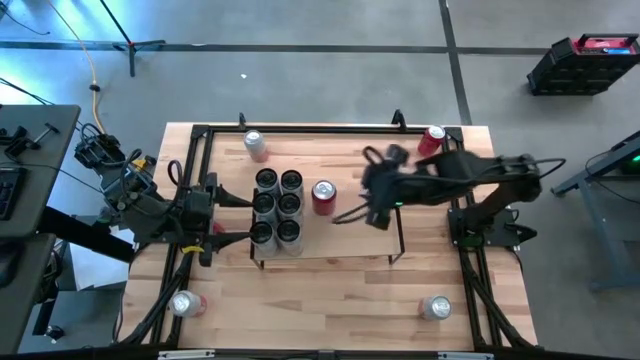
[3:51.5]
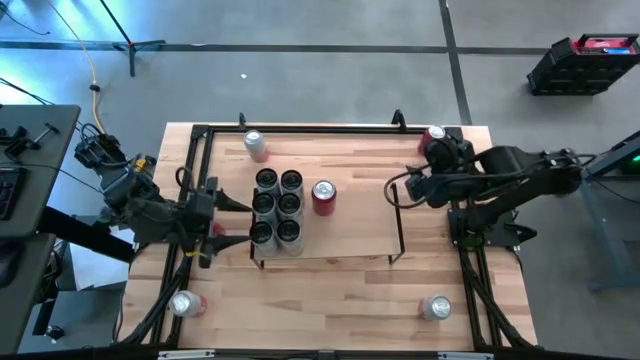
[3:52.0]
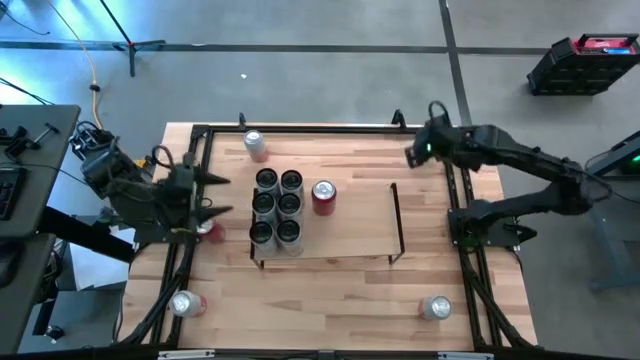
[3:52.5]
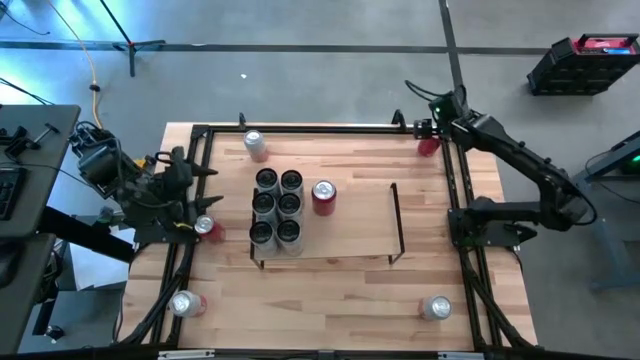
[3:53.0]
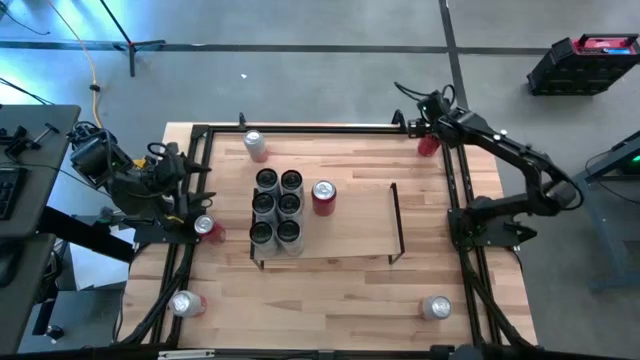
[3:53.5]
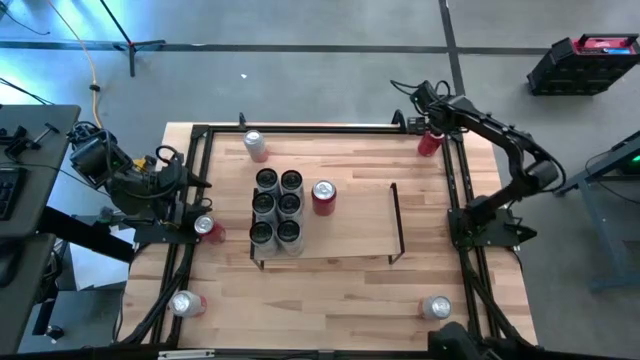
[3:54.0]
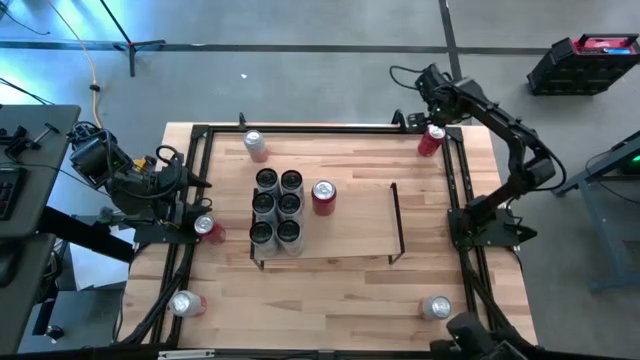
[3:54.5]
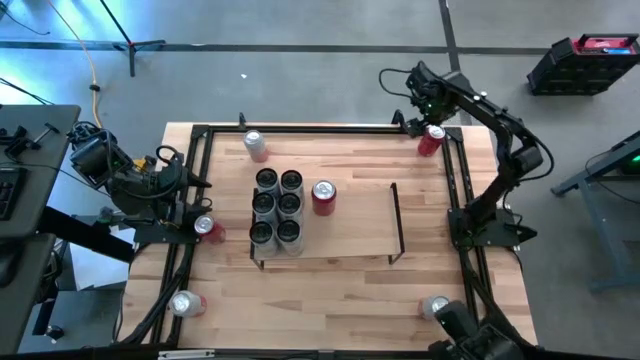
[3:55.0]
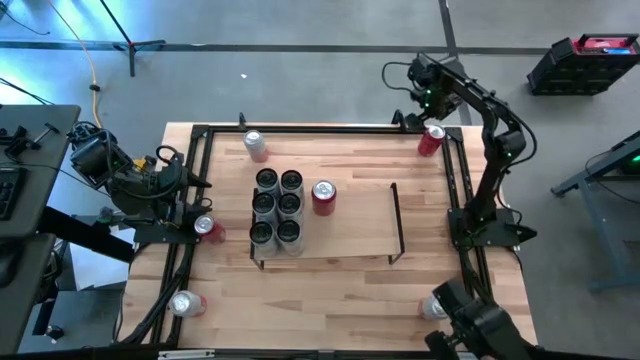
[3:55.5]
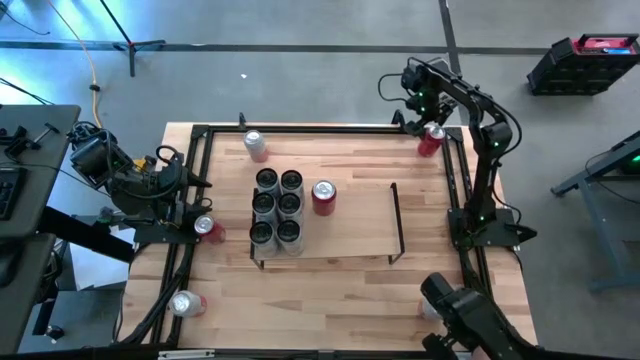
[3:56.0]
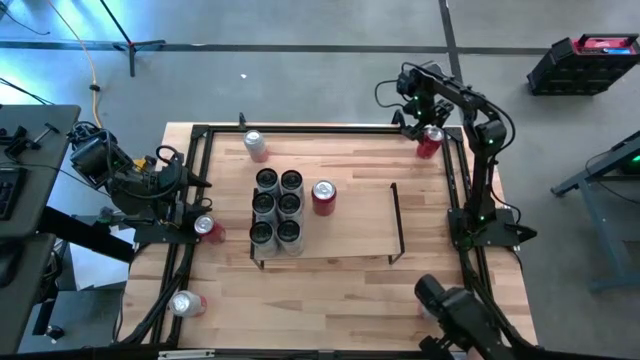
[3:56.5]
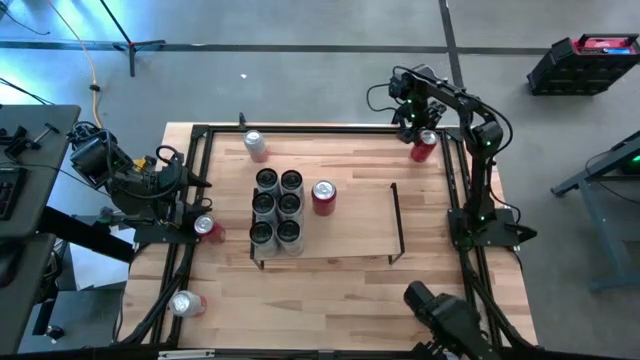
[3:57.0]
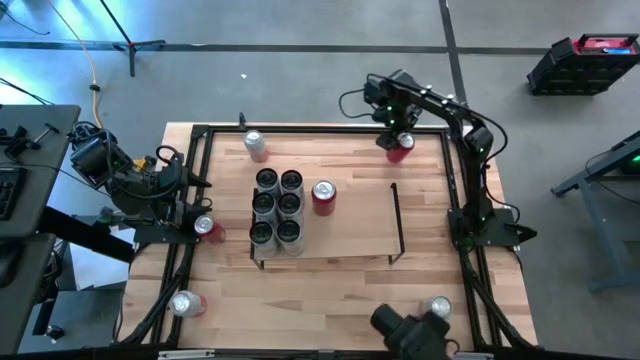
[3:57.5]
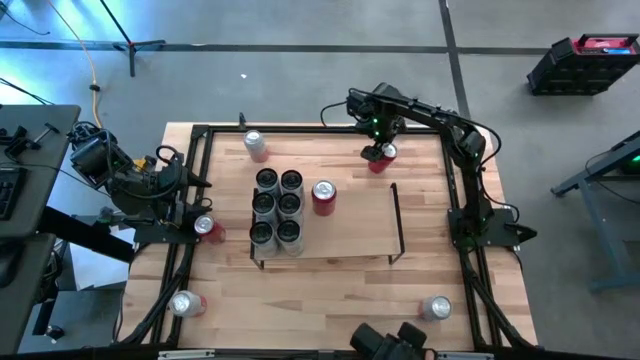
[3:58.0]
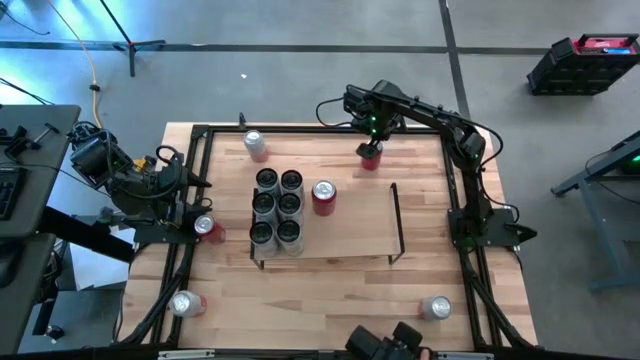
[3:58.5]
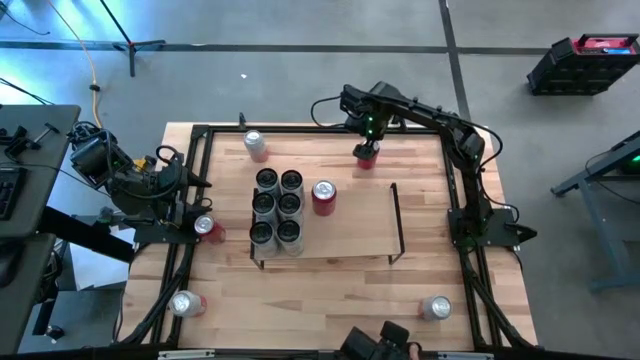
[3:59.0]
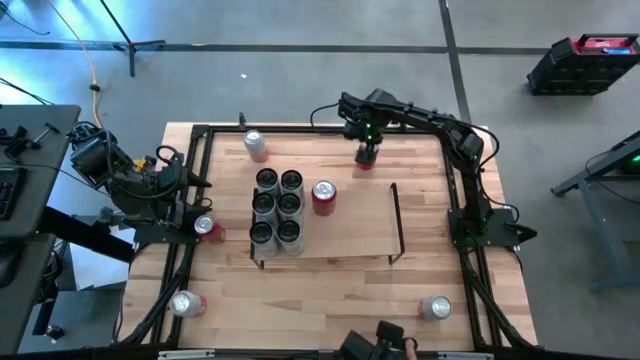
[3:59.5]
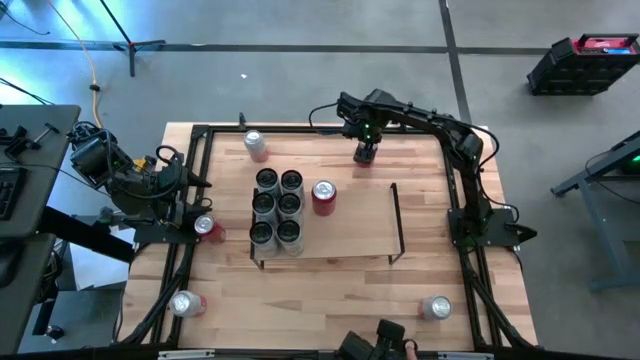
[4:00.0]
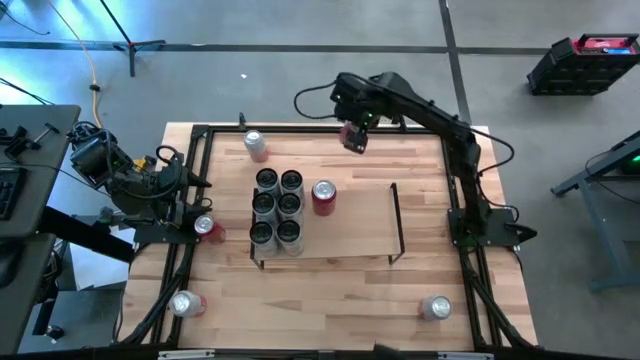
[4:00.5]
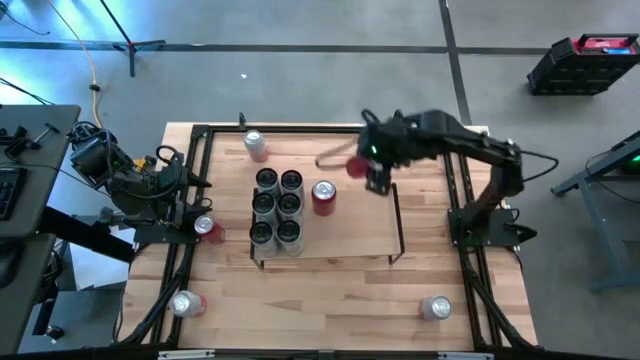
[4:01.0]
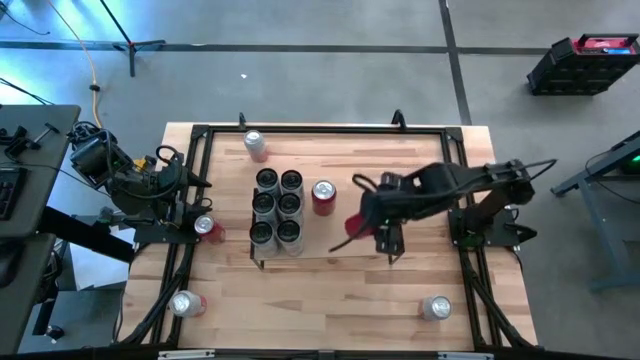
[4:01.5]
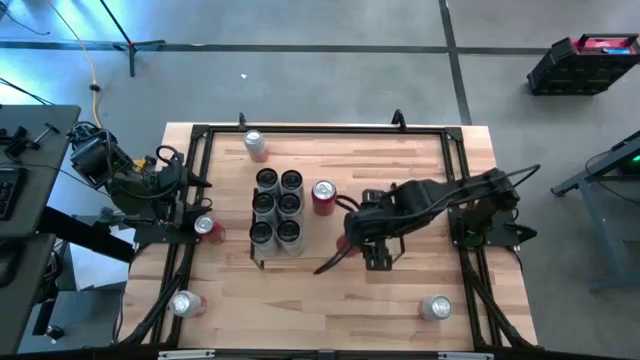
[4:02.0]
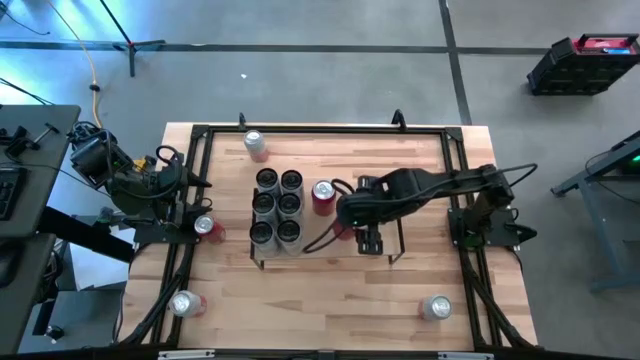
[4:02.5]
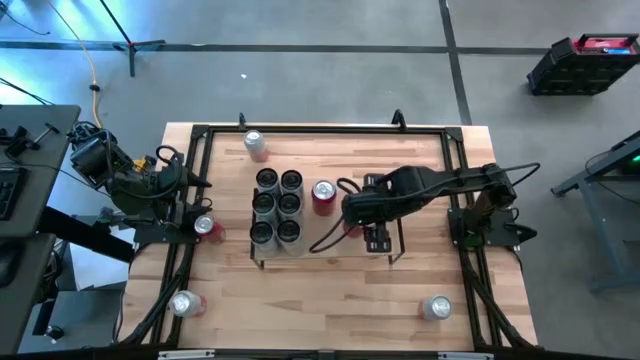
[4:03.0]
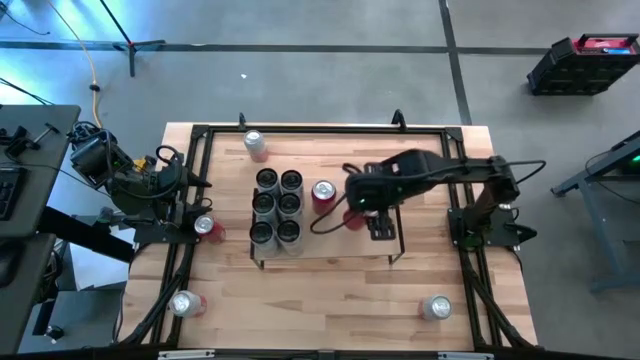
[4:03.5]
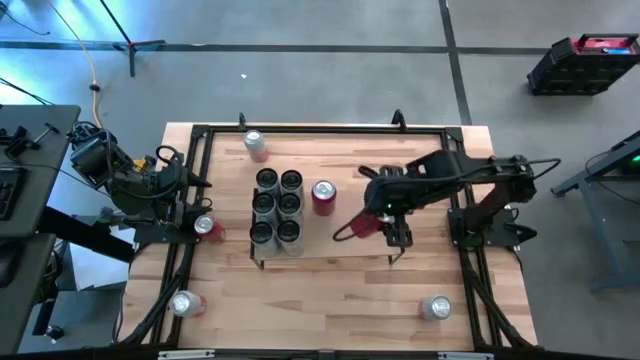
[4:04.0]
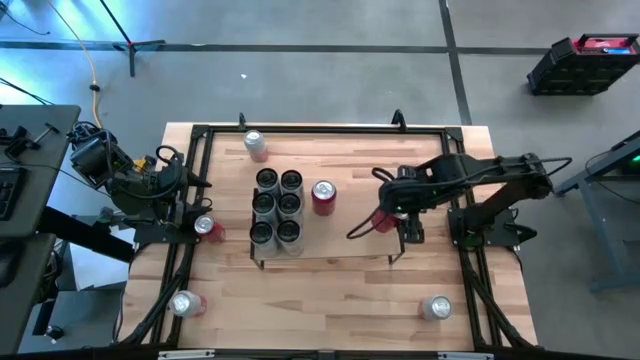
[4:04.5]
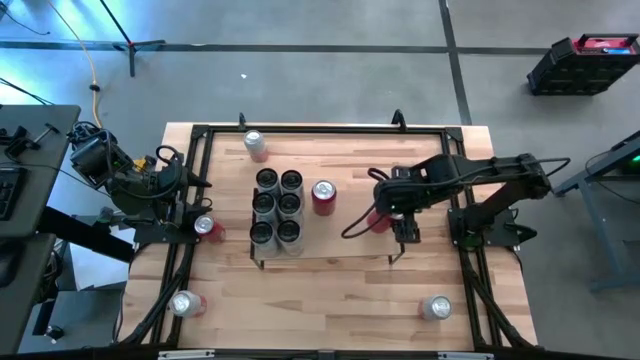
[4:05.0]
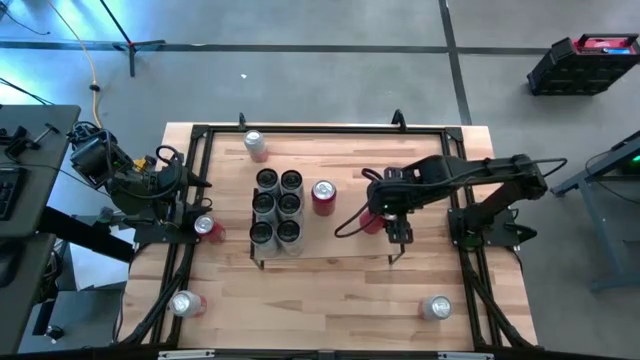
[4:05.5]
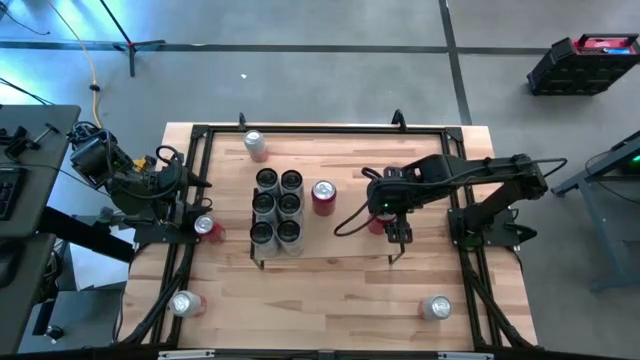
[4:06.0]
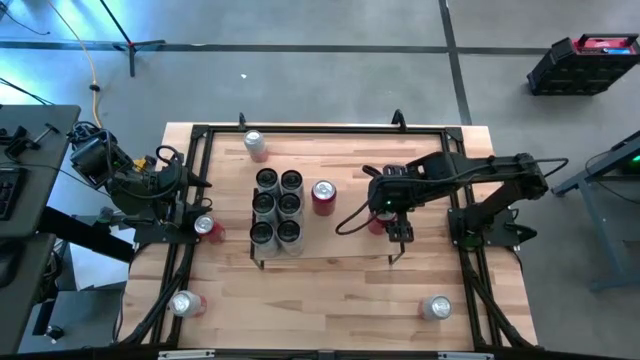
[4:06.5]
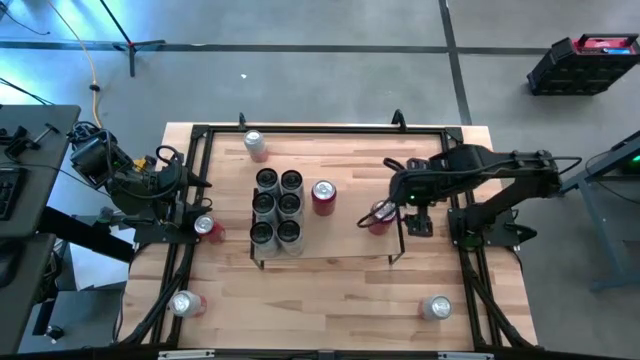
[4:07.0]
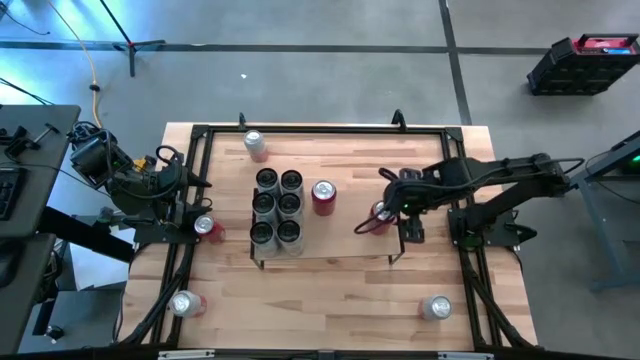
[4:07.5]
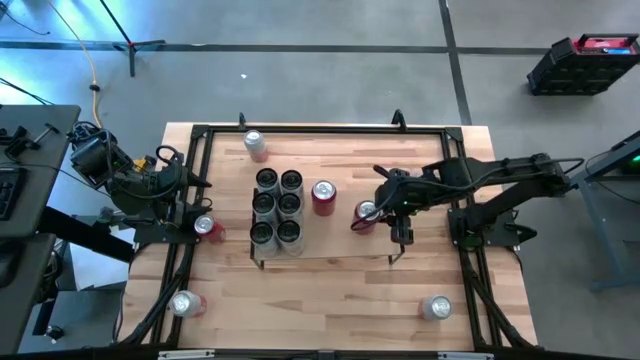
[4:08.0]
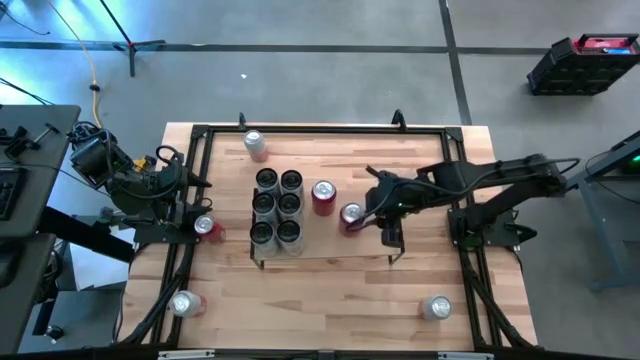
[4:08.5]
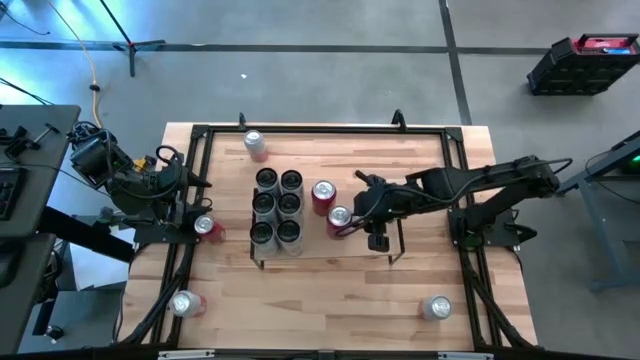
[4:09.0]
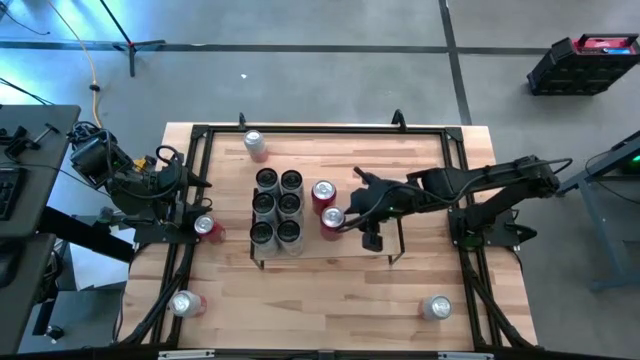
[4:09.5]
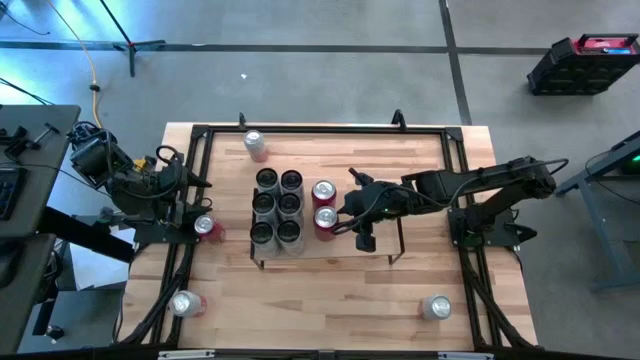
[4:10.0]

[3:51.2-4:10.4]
Task: Place canned beverage on shelf
Put the right red soda can aligned with the other red soda can on the shelf

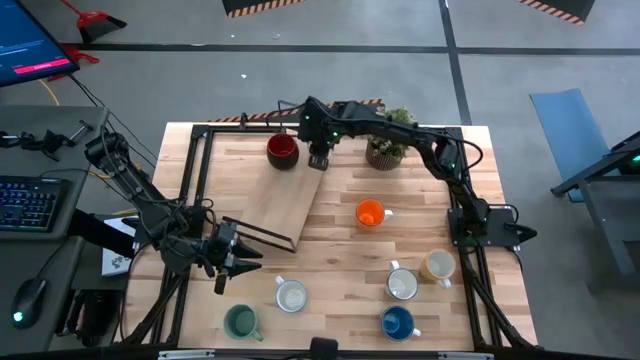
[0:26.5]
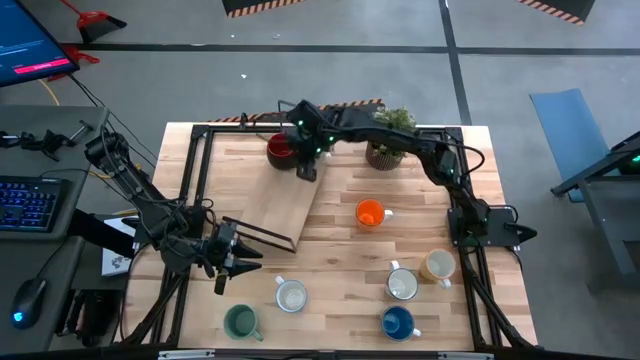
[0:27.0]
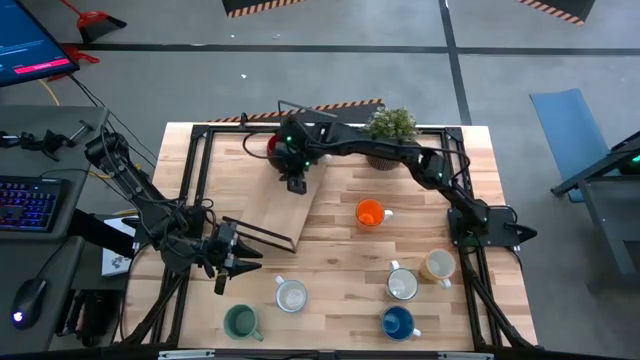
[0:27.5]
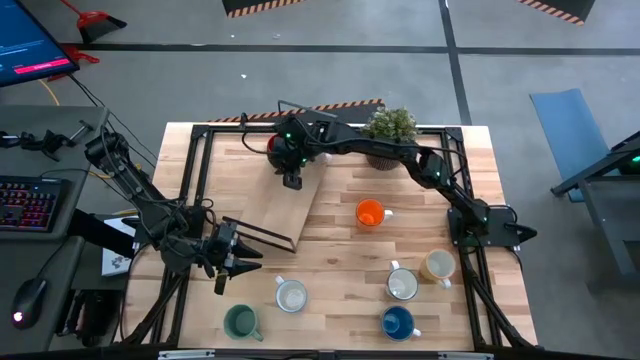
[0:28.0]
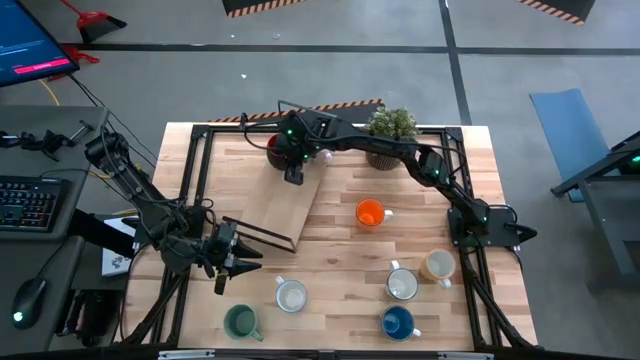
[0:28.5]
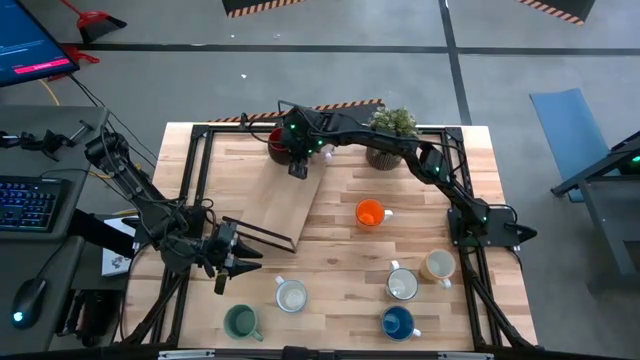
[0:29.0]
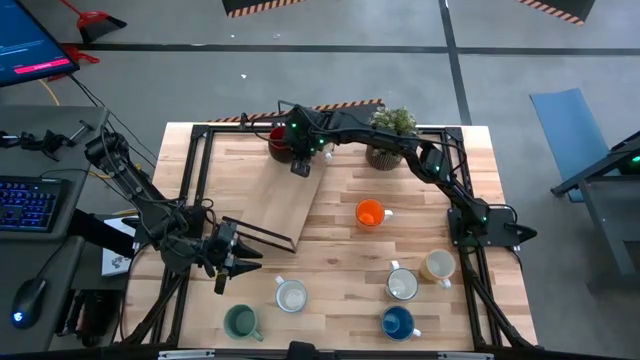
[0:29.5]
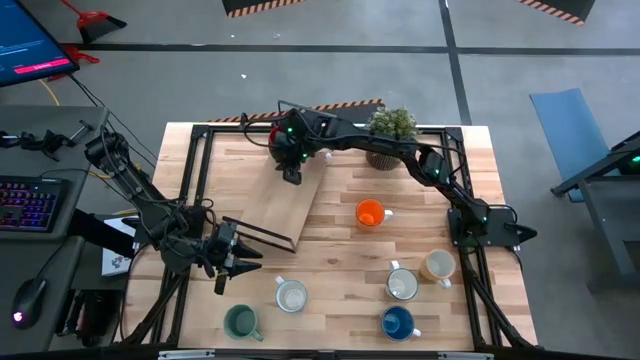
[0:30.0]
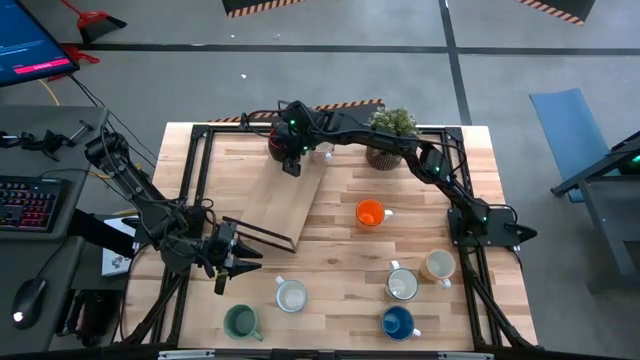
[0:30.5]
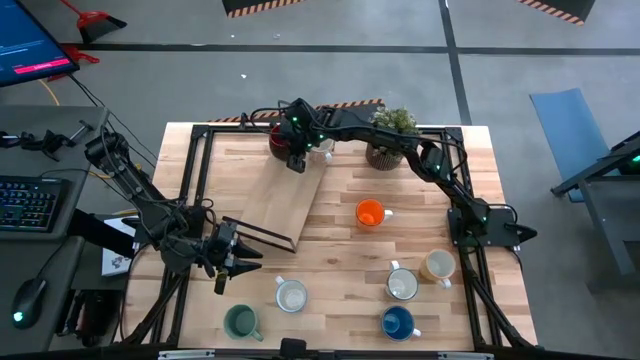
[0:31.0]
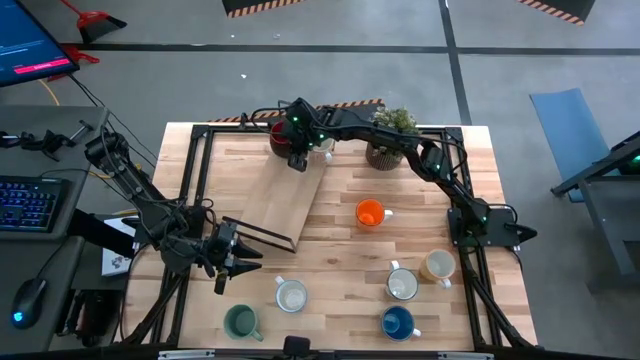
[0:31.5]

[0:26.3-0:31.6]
Task: Place coffee mugs
Adjust the black cup
